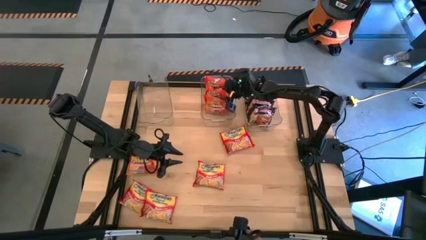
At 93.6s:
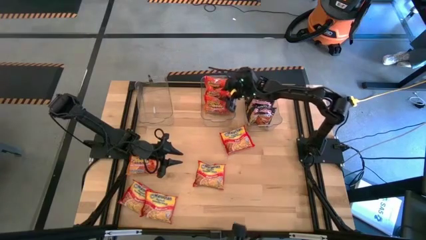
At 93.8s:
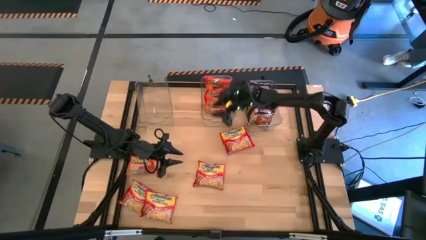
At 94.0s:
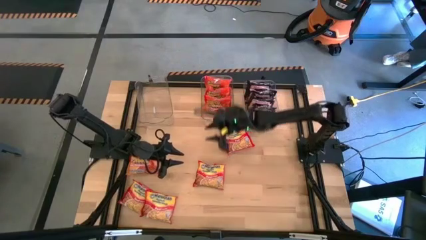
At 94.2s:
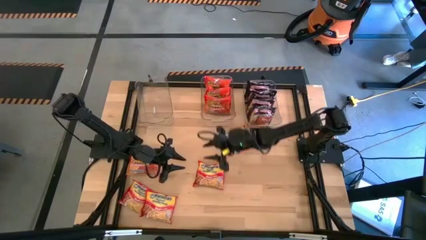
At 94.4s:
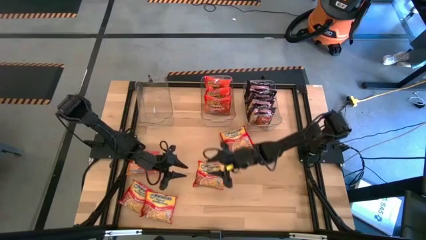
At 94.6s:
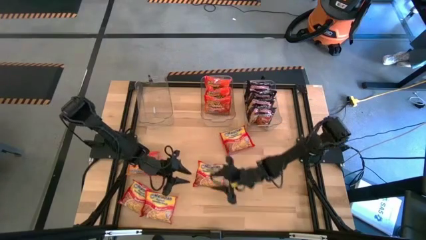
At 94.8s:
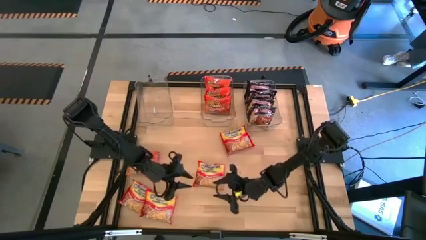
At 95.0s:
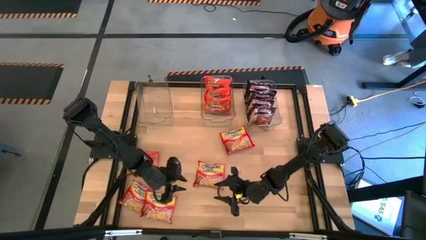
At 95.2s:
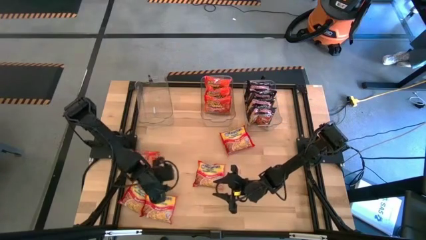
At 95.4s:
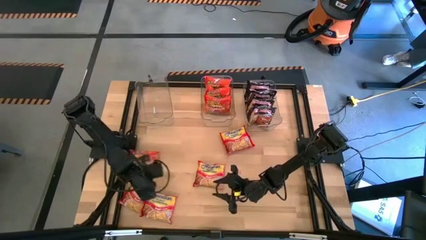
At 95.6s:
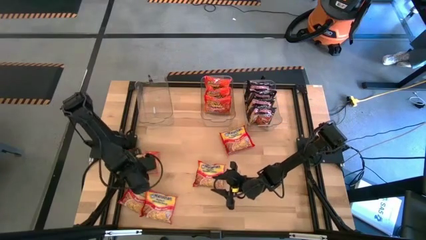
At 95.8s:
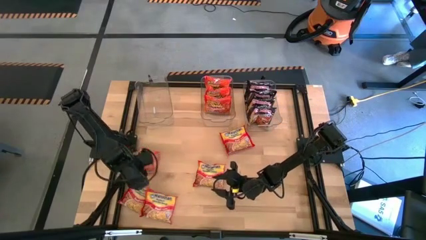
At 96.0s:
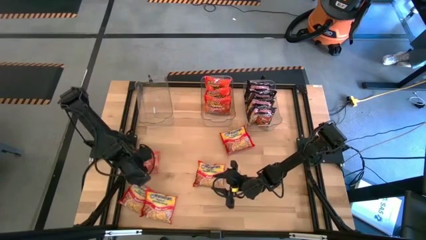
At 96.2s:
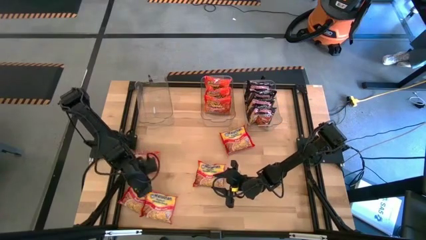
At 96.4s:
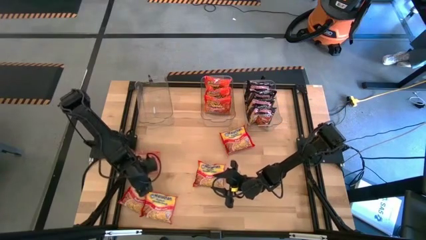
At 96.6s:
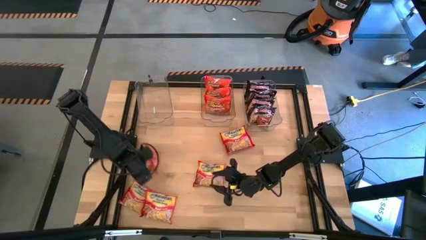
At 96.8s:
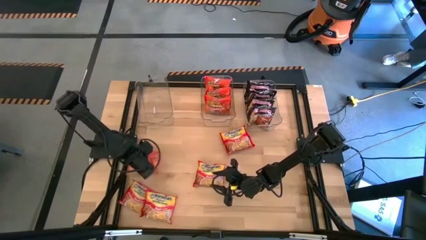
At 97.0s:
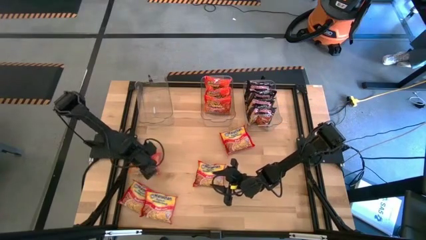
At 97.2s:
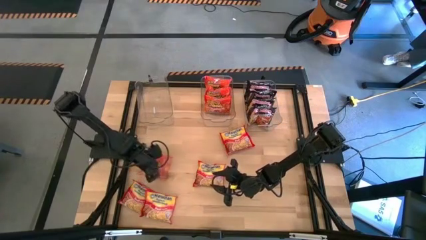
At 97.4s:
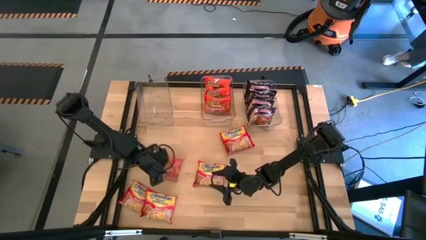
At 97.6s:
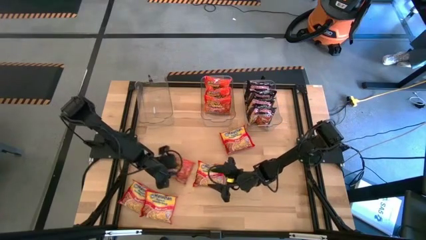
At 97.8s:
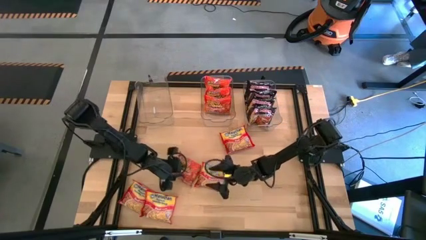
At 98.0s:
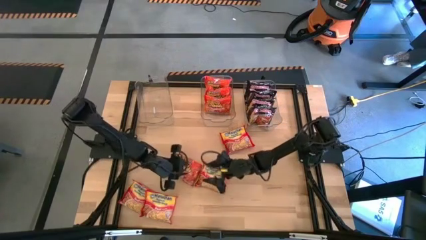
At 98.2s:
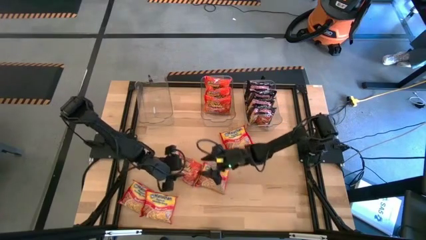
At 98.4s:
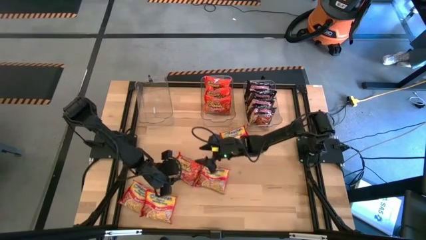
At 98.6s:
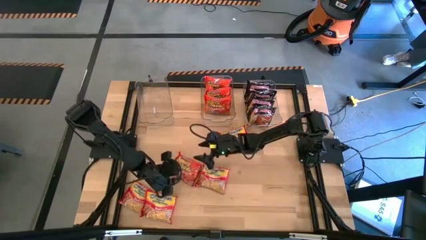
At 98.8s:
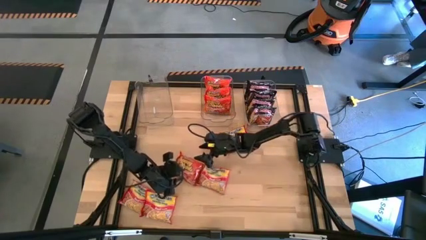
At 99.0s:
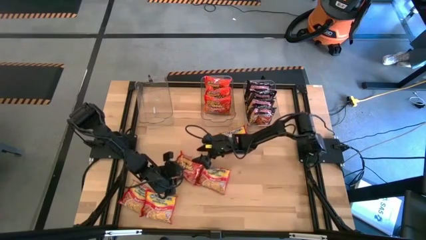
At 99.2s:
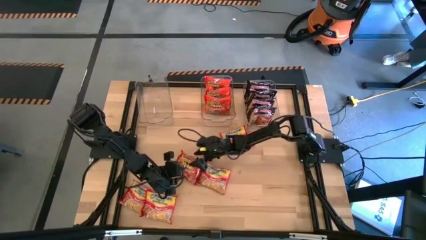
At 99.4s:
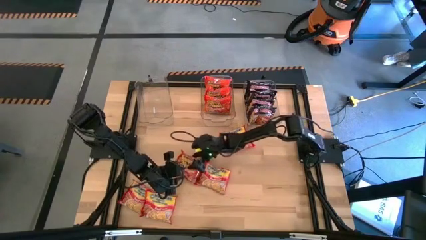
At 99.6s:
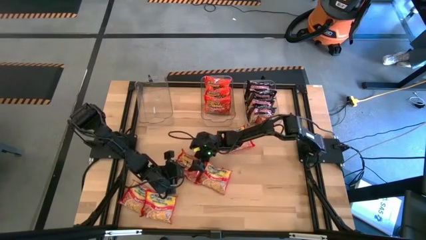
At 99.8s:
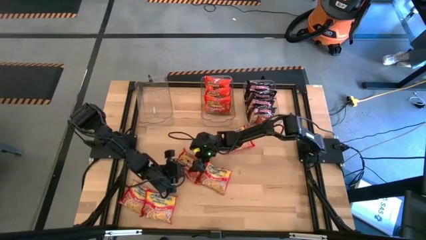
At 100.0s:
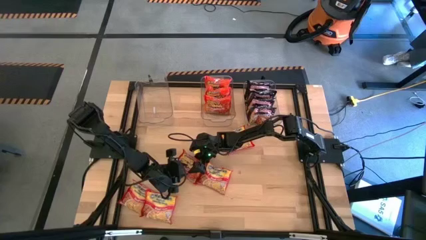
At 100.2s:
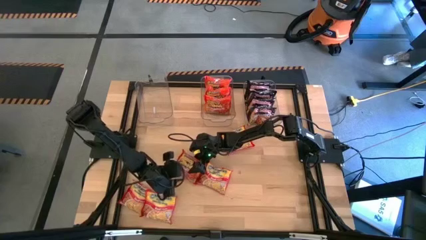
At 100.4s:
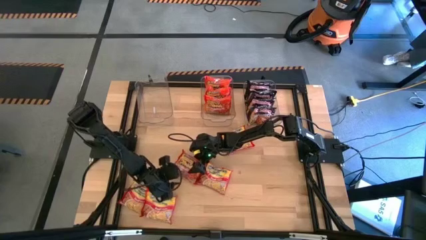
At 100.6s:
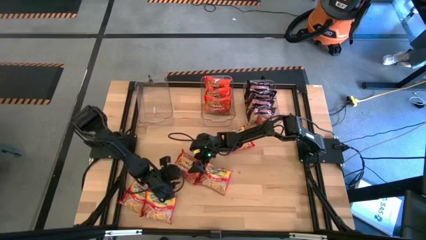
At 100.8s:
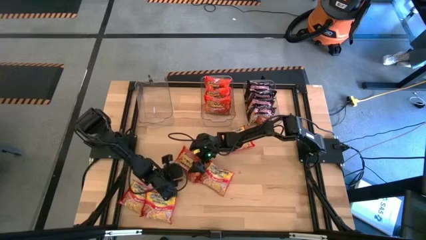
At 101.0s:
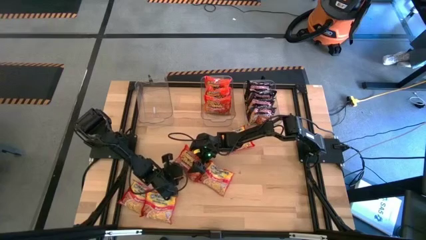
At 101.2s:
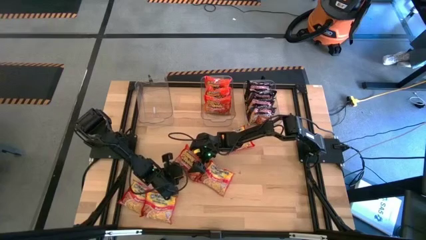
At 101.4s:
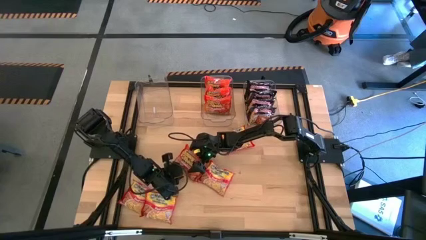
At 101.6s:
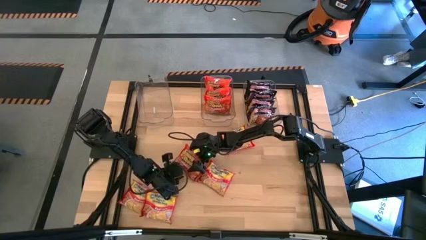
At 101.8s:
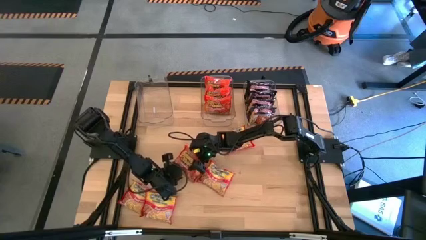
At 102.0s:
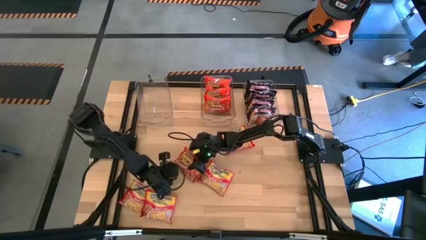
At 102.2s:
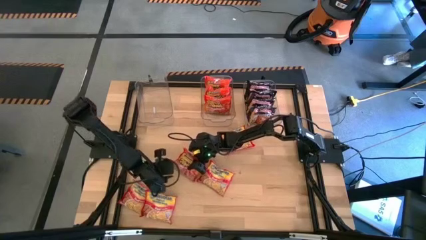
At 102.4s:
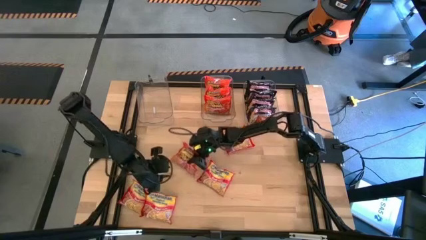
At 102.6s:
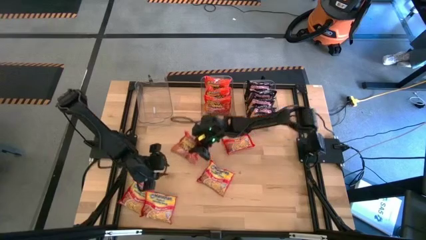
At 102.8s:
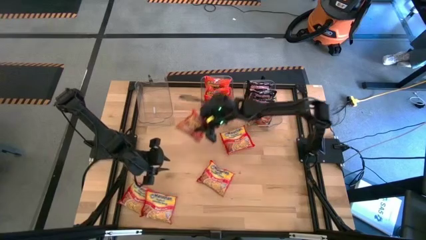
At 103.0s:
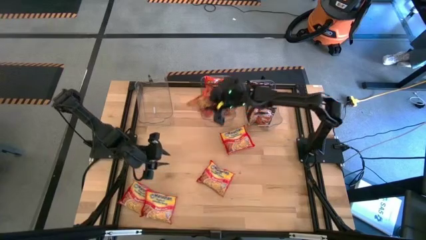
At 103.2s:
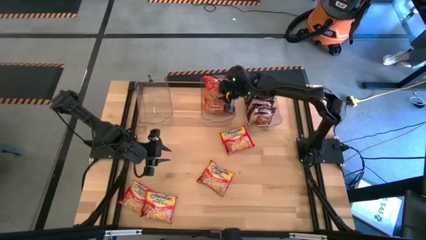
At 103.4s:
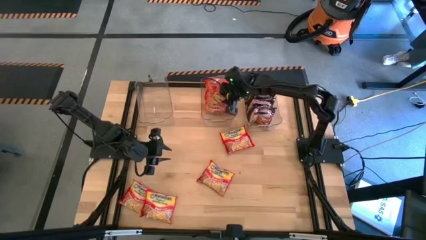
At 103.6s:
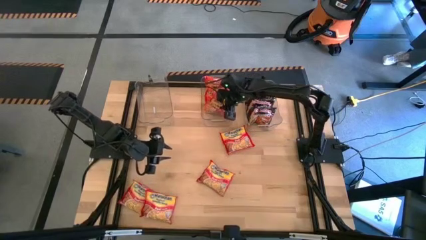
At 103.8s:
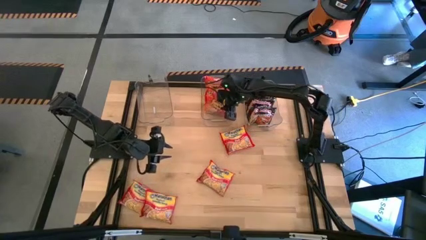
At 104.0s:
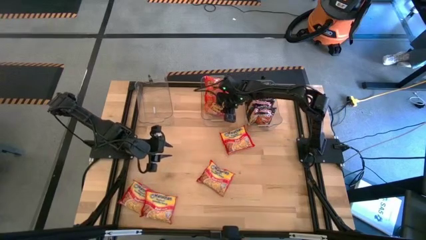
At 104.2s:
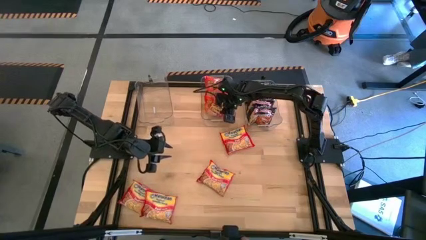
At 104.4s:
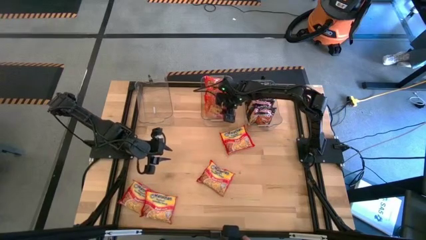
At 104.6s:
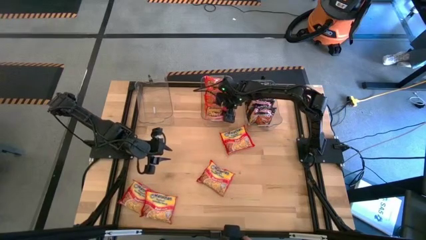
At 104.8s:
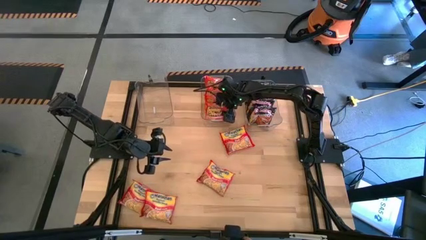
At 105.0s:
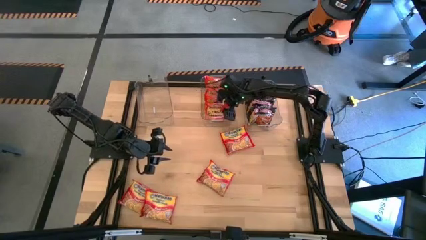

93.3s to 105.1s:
Task: Sort Maruchan noodles
Put the orange noodle pack into the middle transparent bin

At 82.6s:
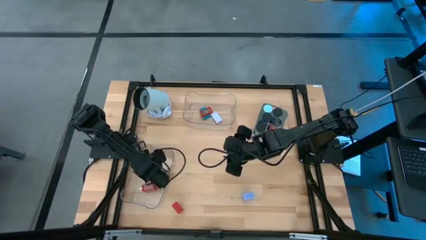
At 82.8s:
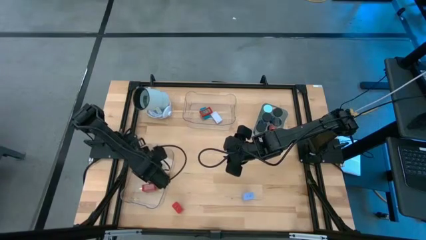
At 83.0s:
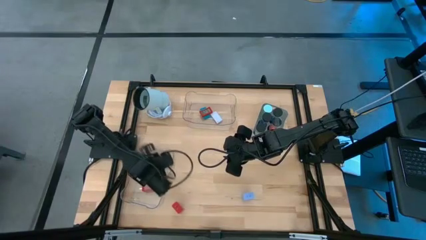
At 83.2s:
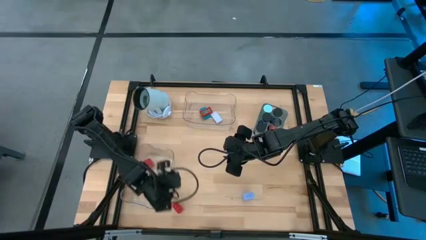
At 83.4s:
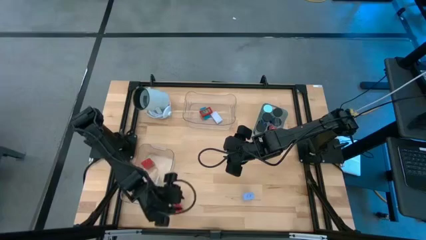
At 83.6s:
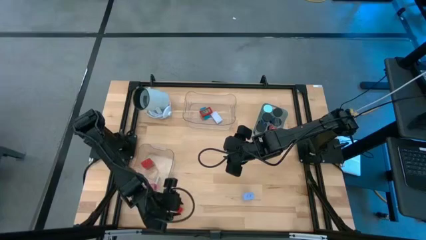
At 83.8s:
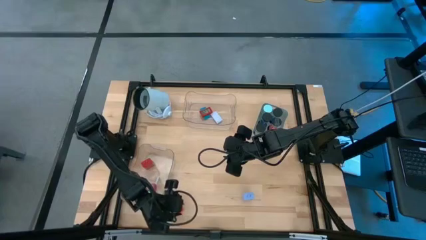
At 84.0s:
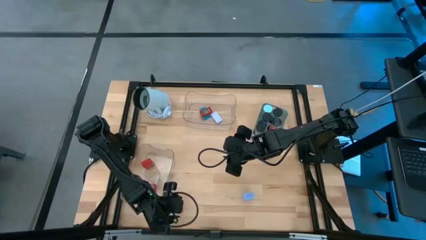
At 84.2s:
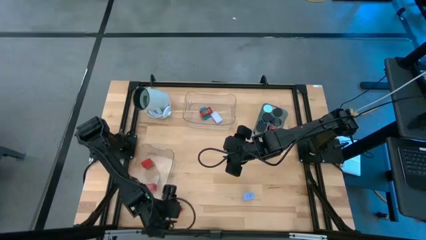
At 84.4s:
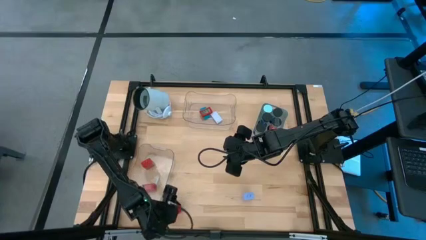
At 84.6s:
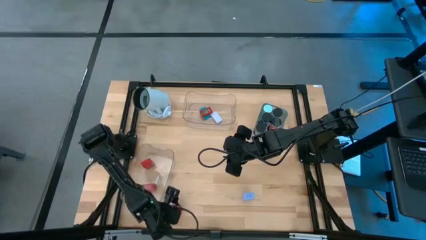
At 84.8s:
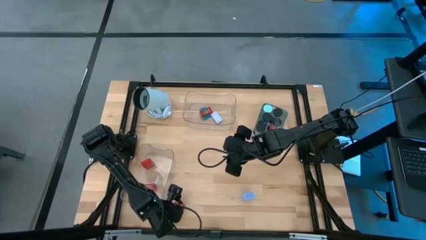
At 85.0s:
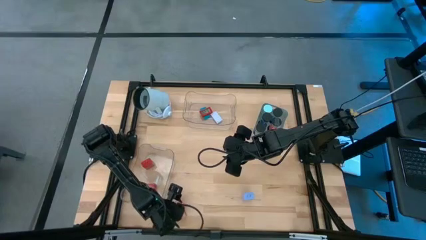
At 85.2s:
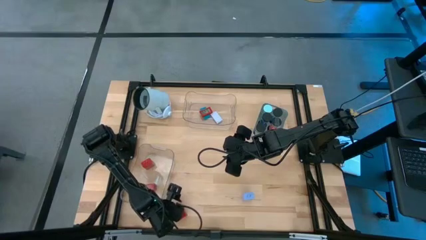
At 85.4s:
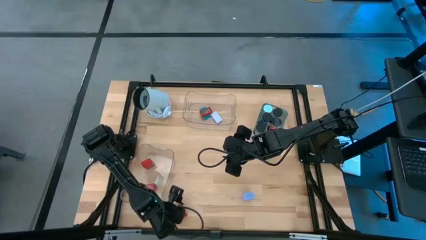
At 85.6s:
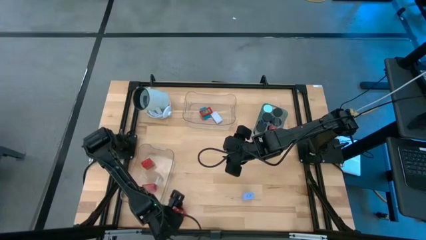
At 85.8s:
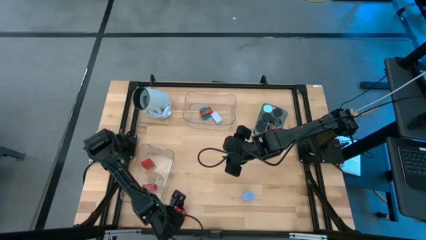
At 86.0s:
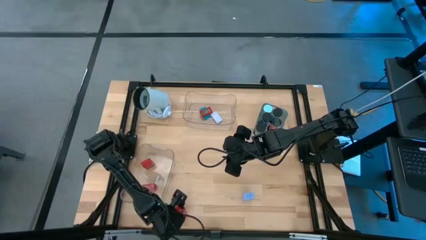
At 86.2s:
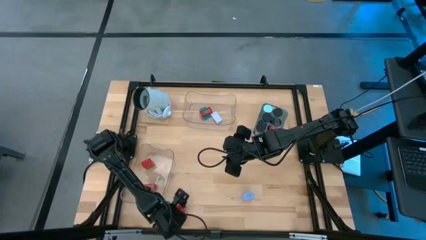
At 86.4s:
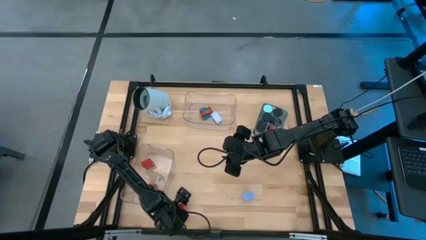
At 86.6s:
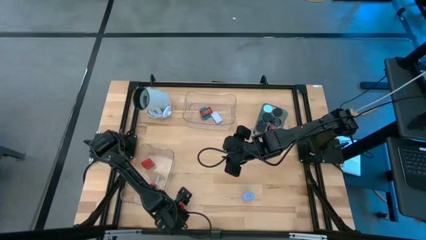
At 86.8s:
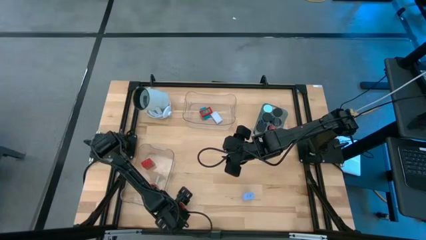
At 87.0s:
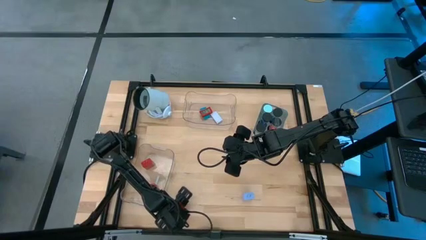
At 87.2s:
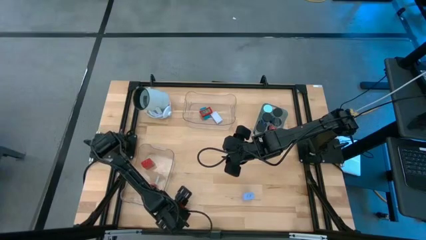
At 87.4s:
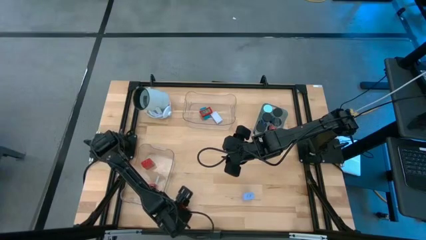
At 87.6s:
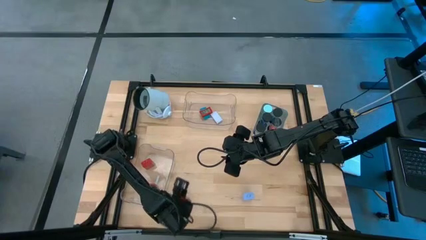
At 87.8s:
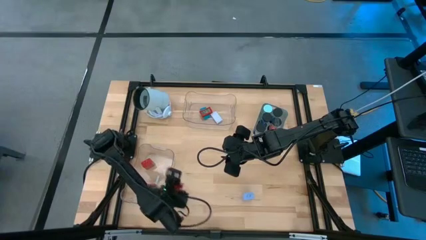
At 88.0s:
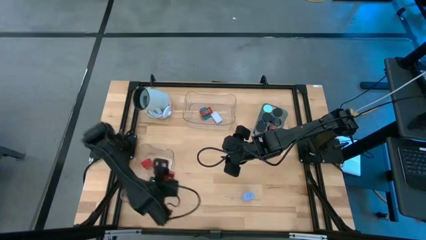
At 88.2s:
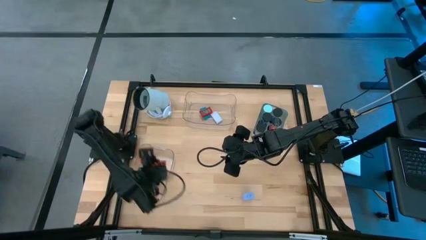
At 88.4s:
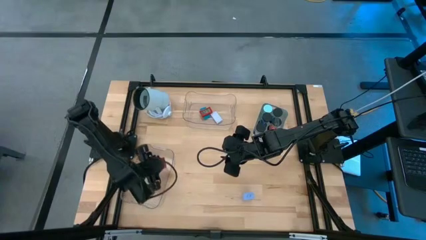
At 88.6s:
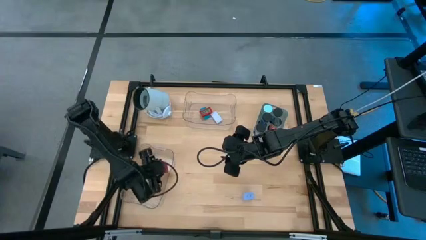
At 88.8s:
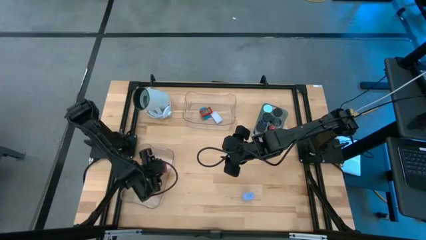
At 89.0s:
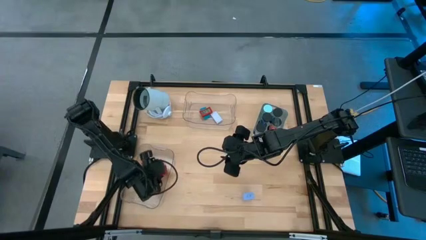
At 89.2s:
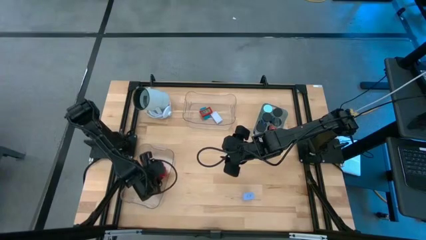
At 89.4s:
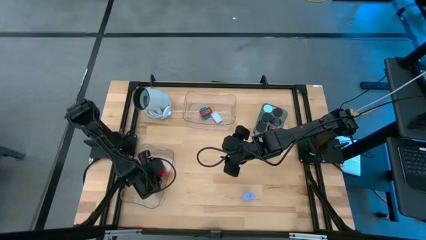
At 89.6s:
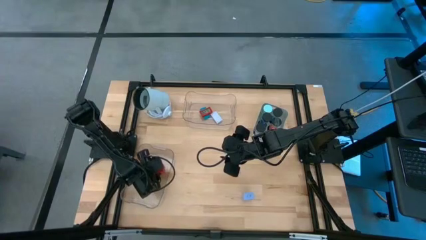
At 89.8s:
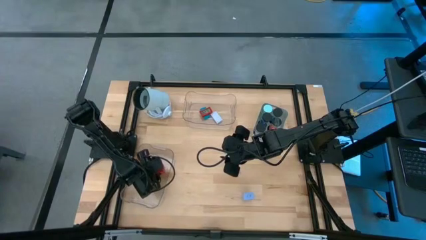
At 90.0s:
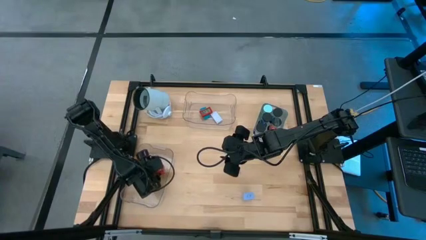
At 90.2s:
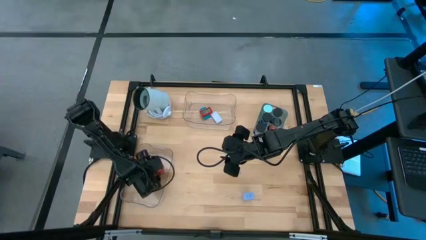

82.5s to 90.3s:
Task: Pick & Place Office items
Put the red USB adapter into the left clear bin
